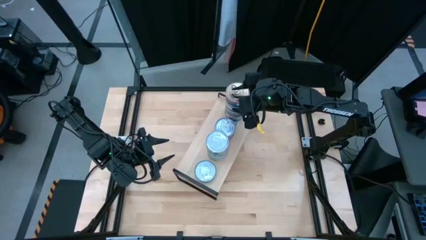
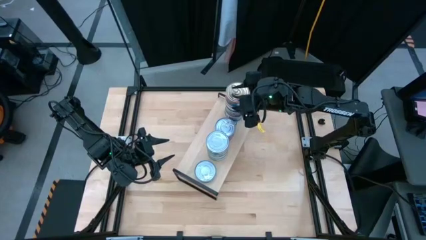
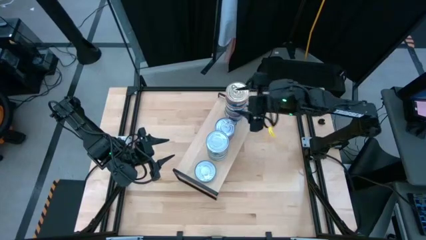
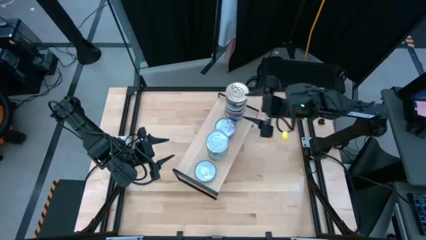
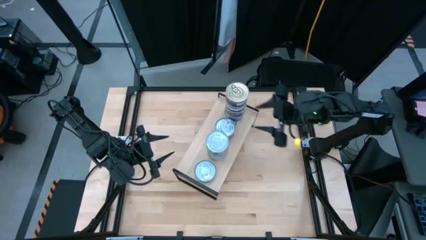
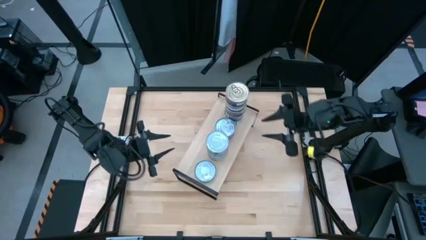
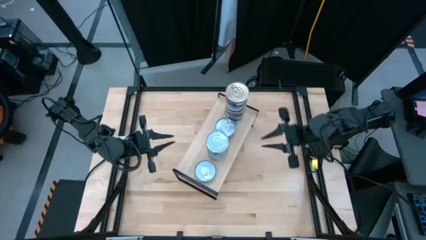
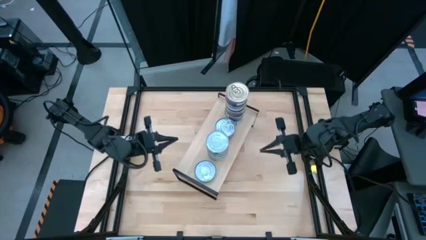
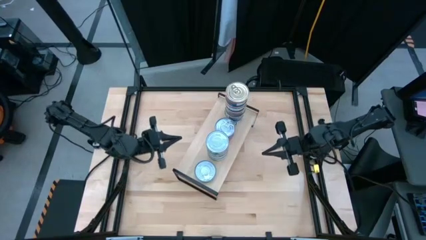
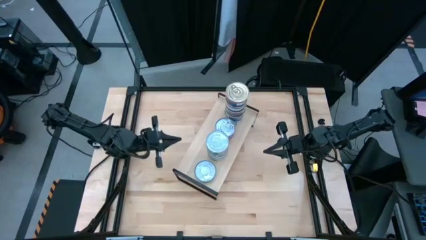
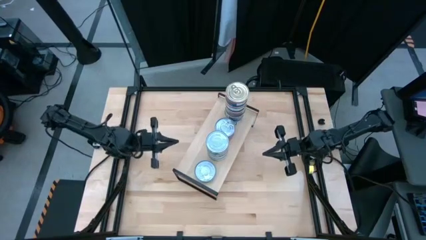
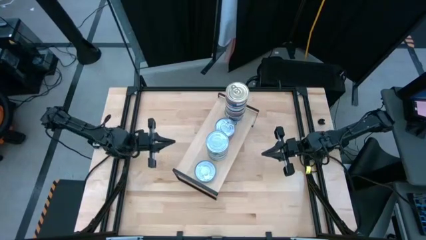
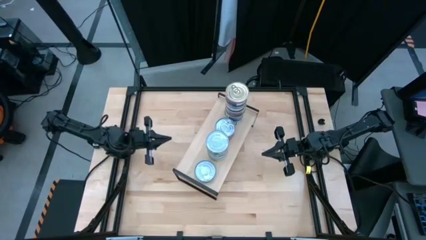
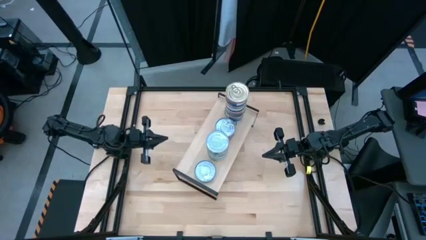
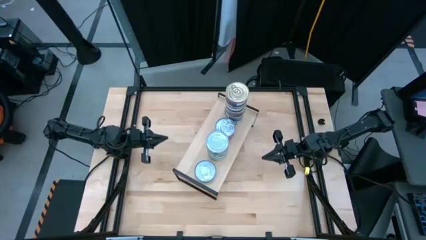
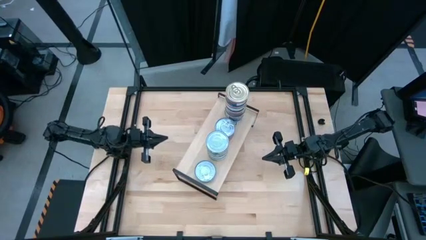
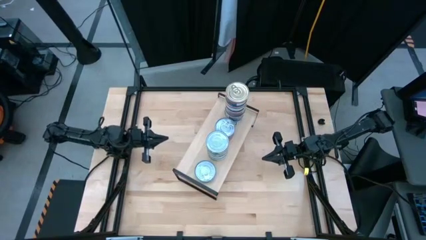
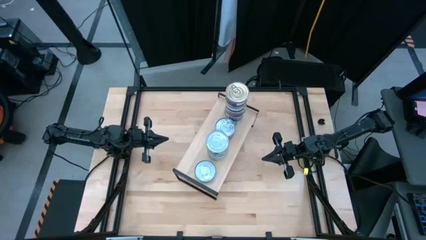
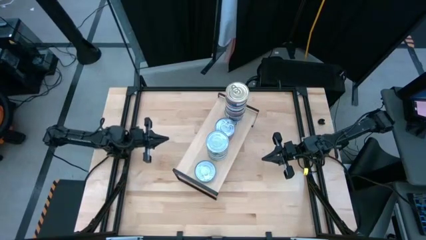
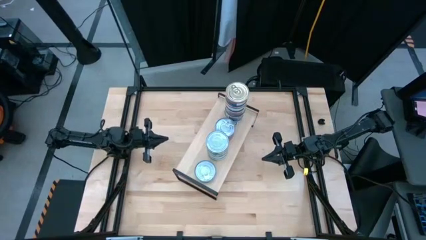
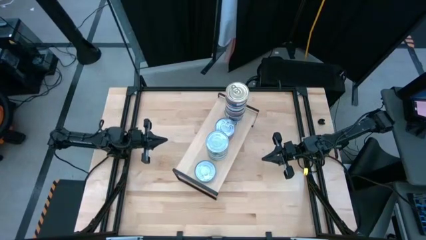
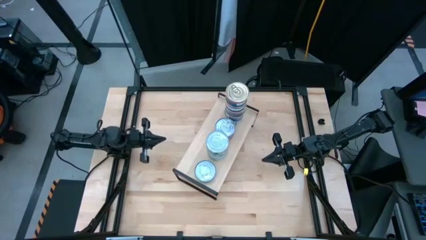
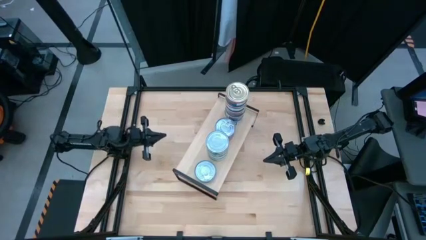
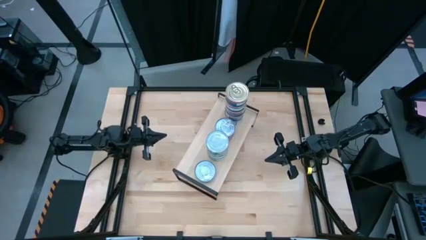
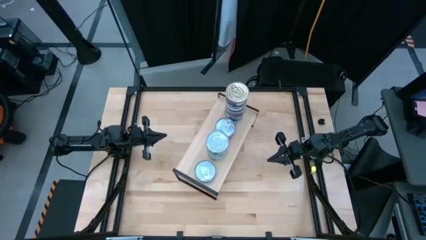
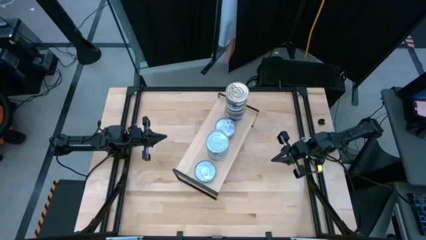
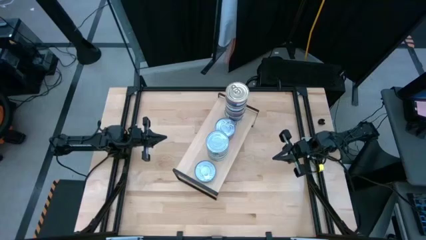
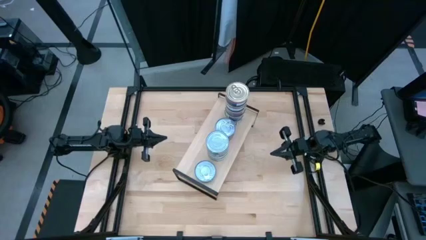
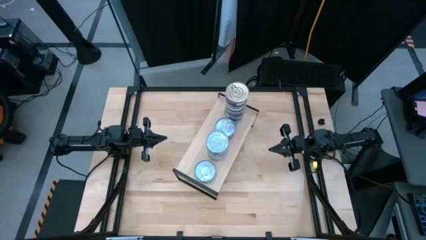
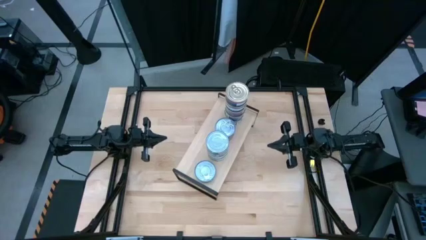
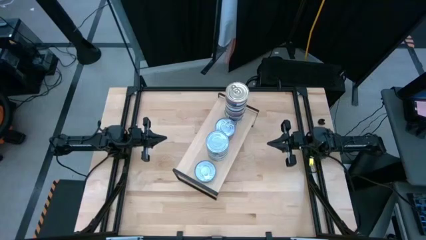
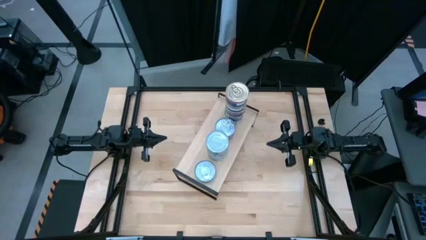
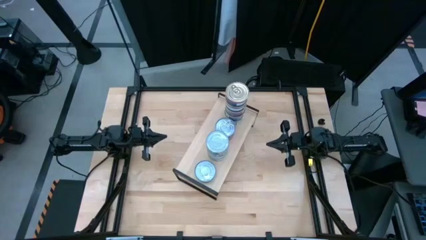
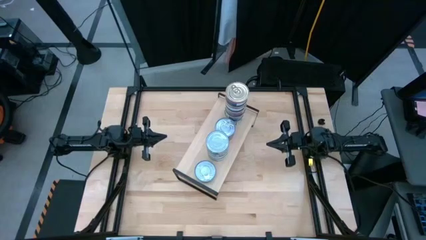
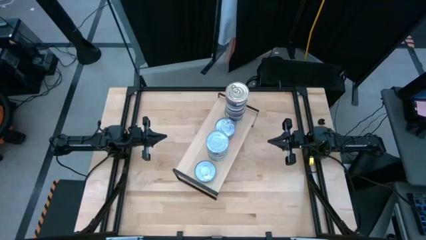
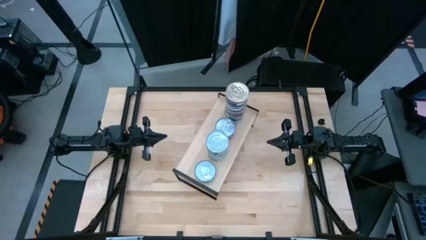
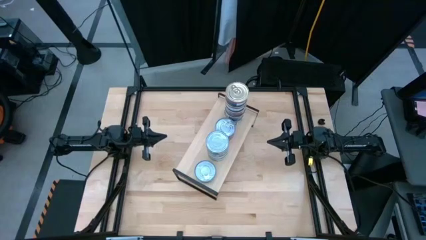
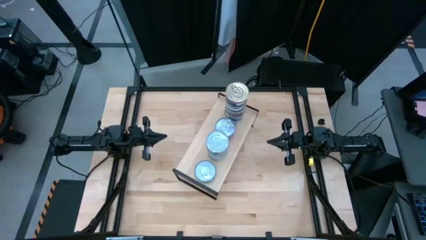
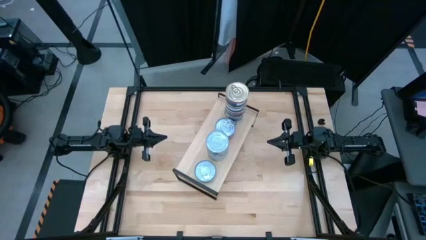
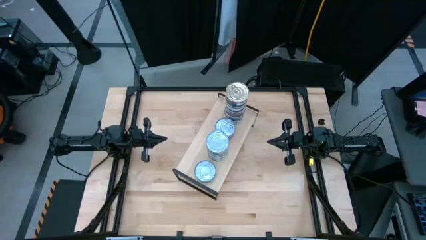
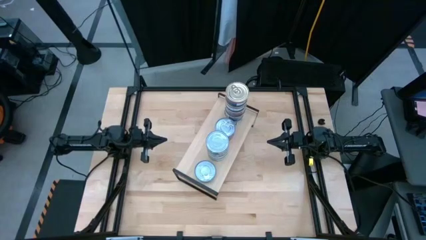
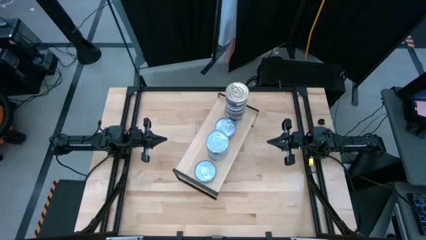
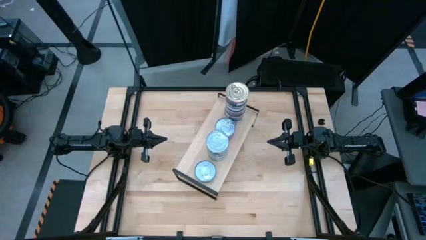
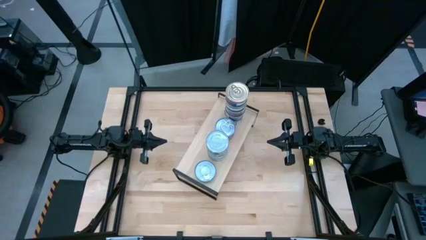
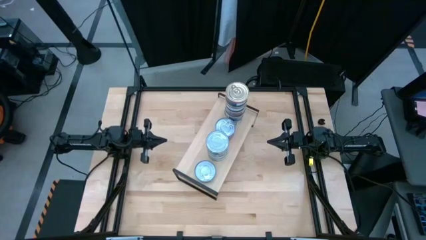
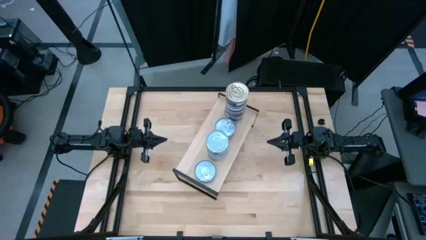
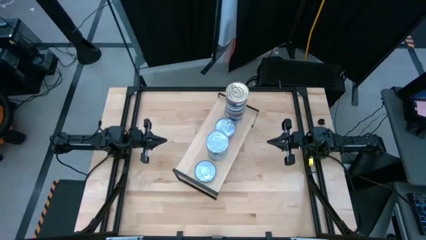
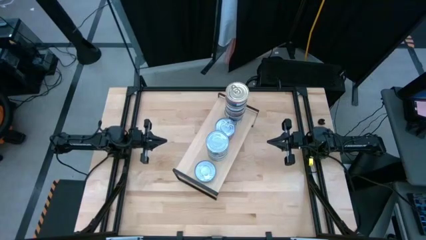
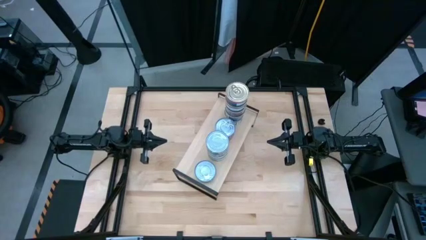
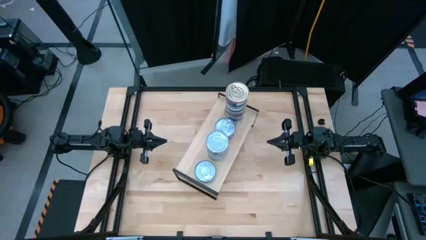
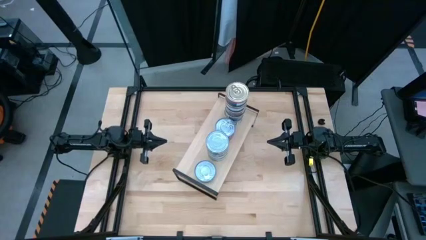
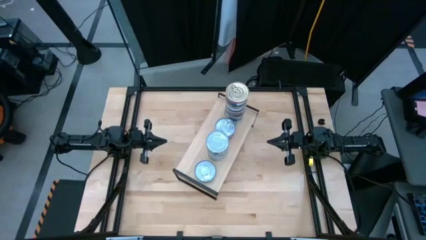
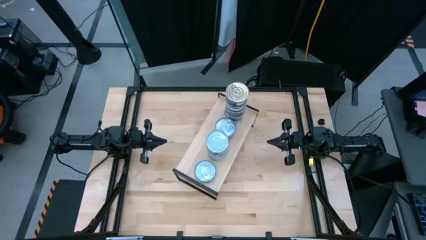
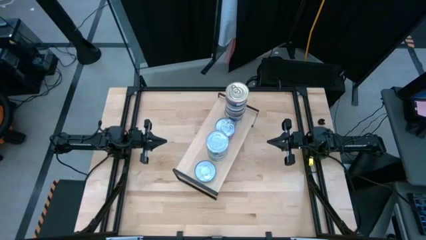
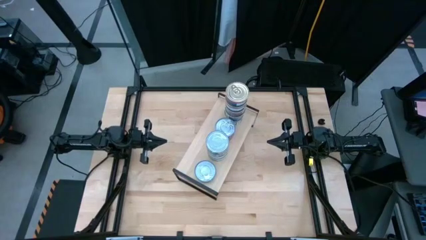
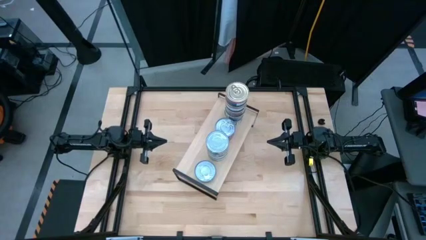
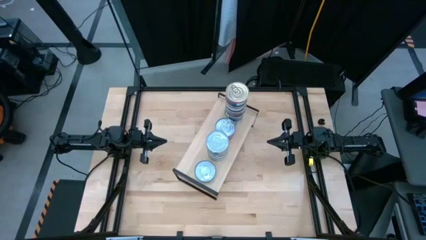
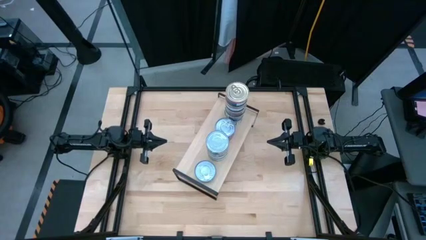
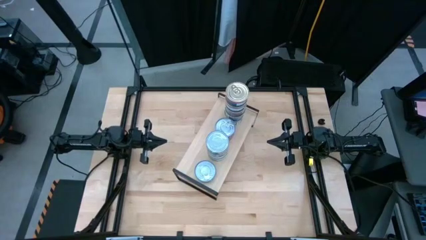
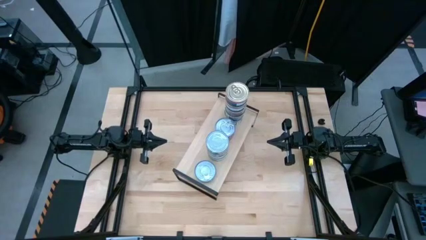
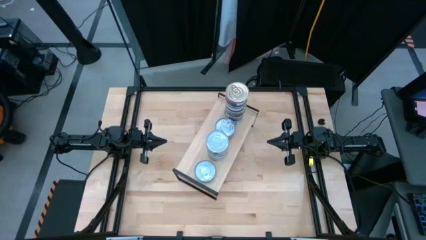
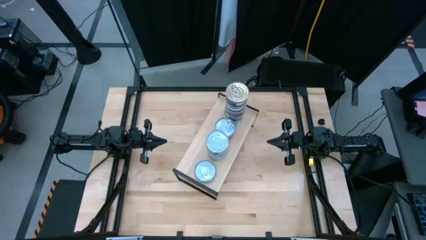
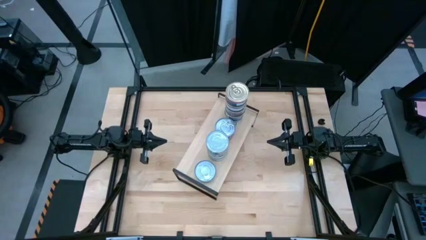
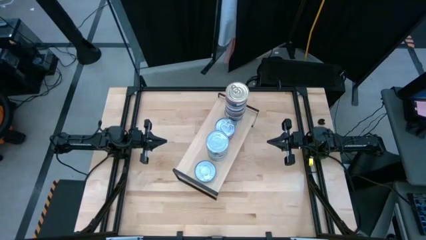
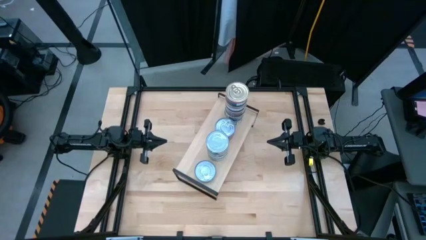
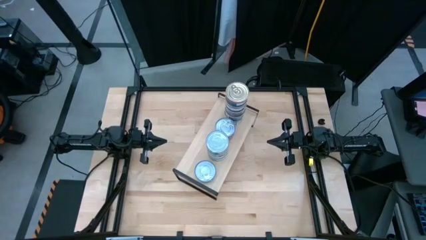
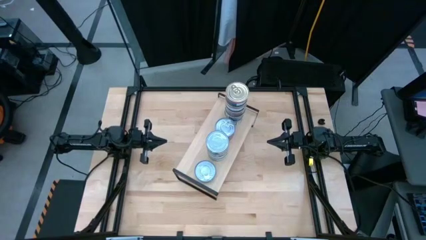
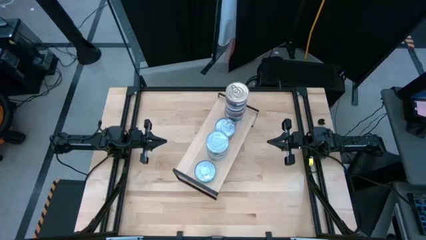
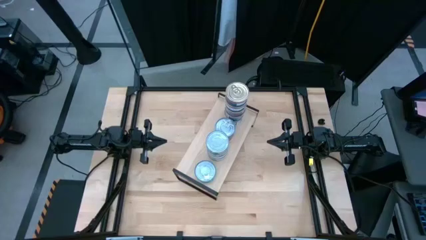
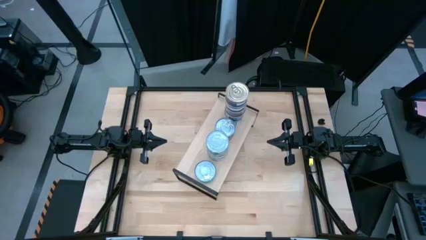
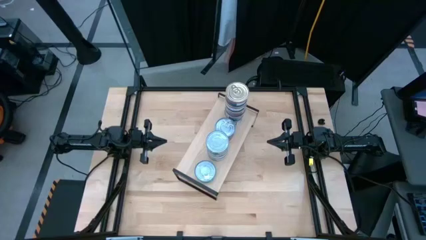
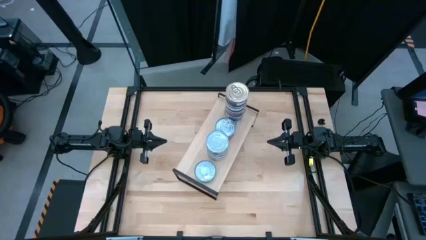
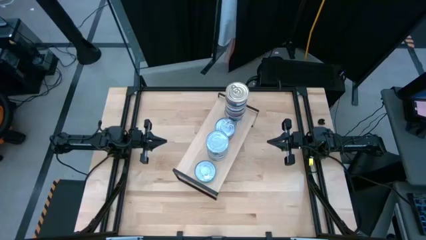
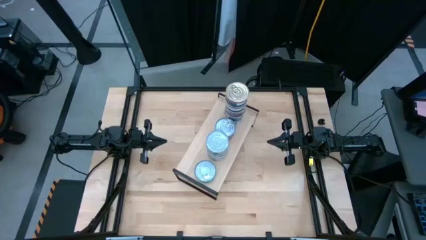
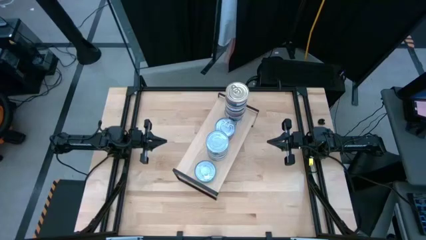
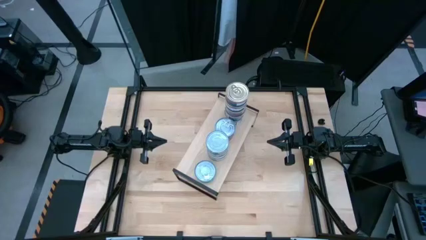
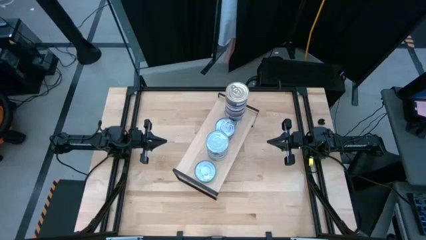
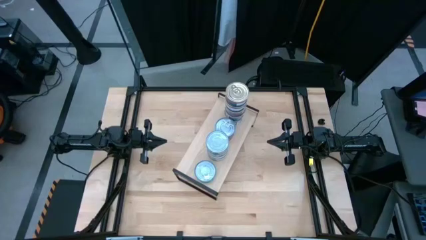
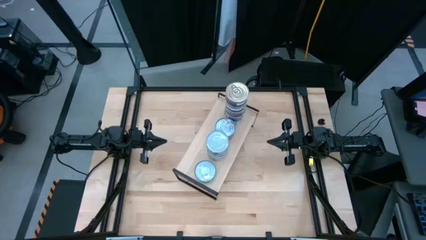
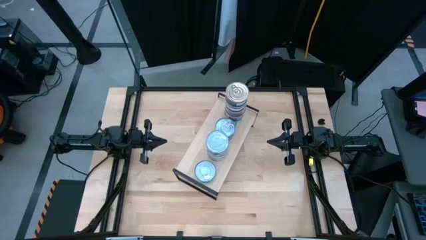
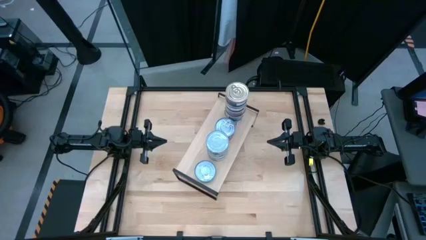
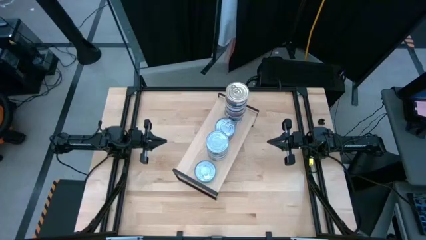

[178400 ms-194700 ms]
Task: Stack canned seafood by type on shelf
Return to Home Position

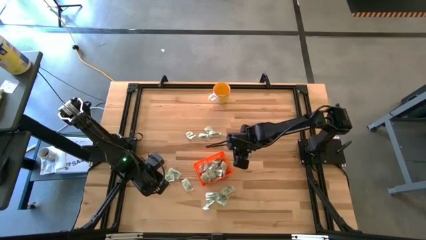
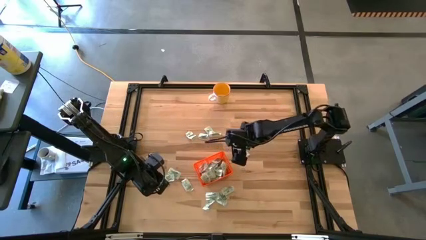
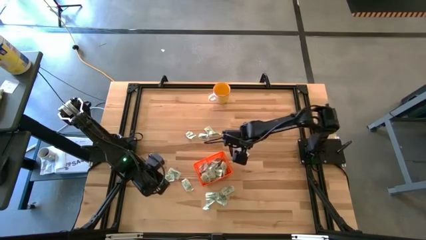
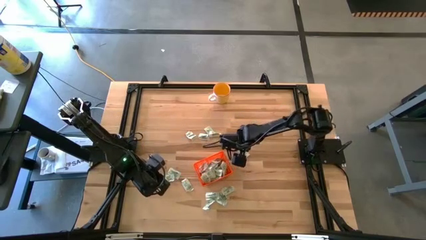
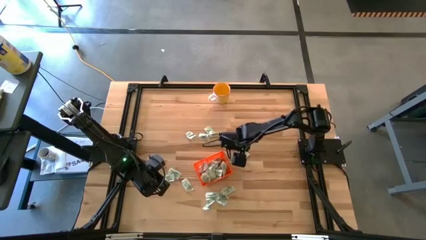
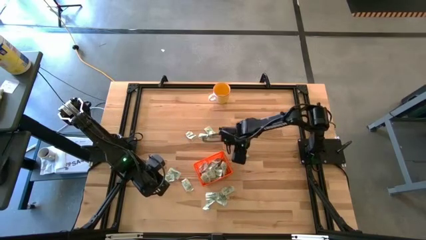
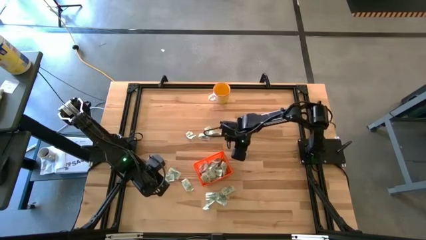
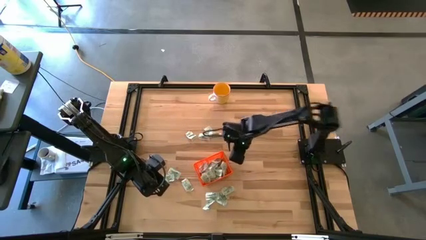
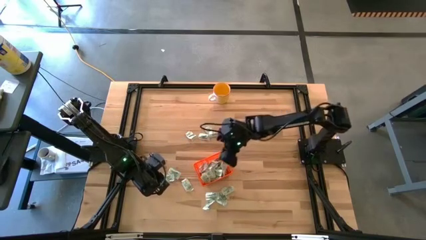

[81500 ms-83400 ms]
Task: Pick and place Stevia / Truvia into bins
Put the stevia packet into the bin
